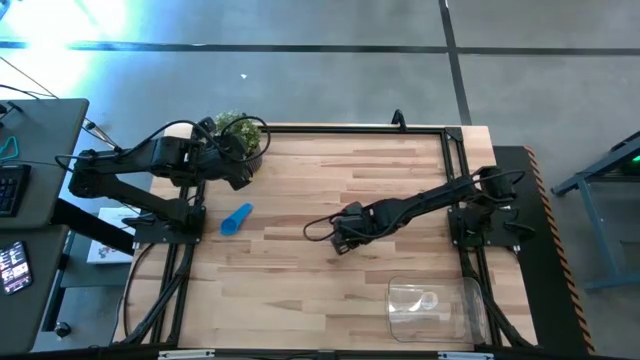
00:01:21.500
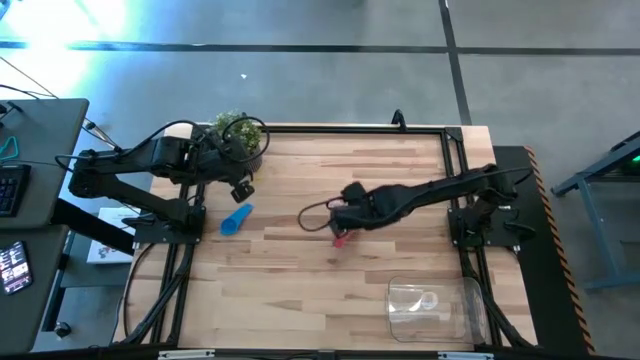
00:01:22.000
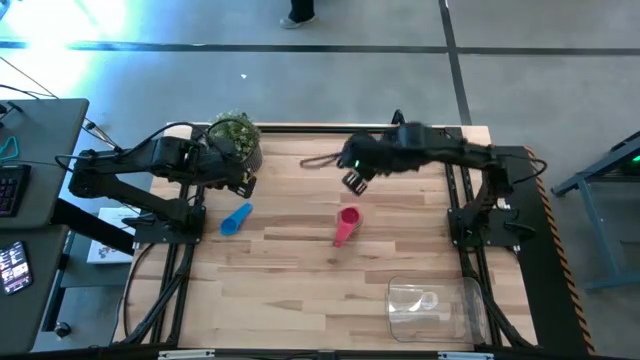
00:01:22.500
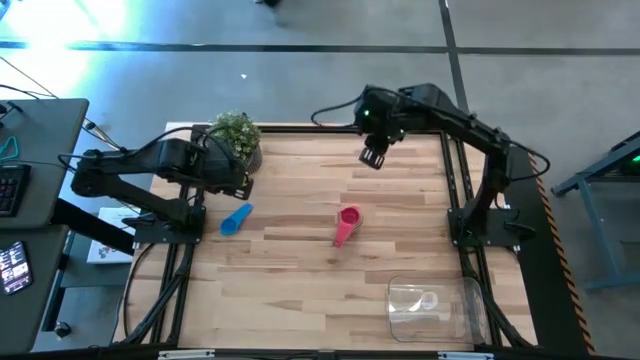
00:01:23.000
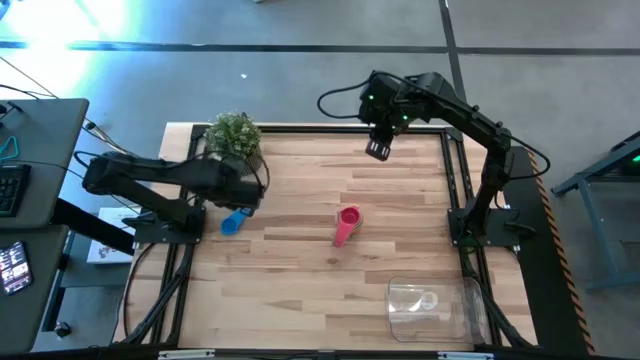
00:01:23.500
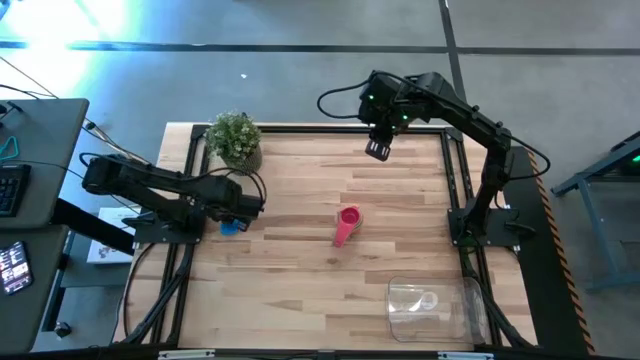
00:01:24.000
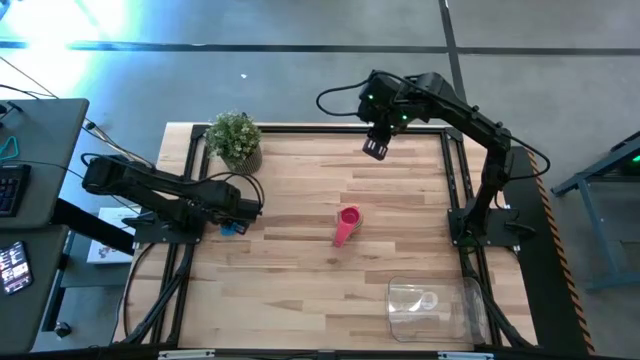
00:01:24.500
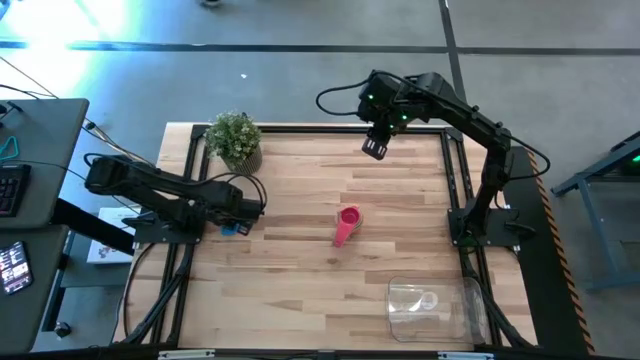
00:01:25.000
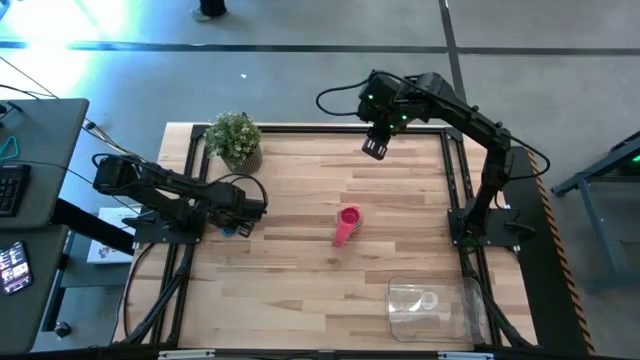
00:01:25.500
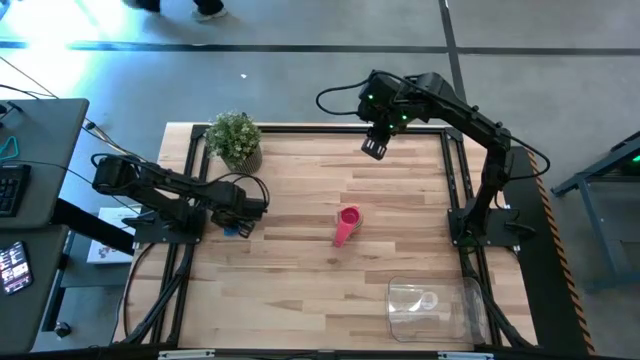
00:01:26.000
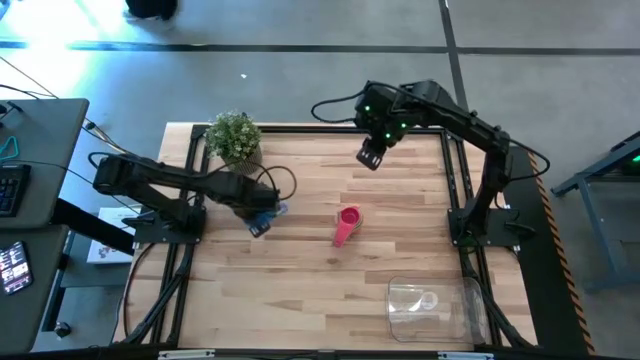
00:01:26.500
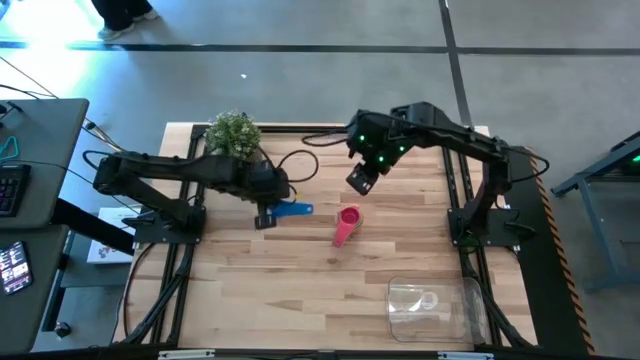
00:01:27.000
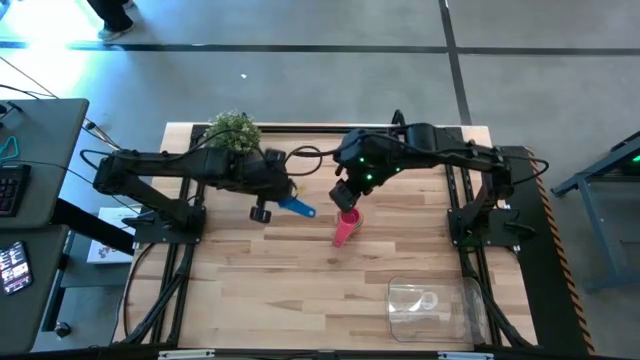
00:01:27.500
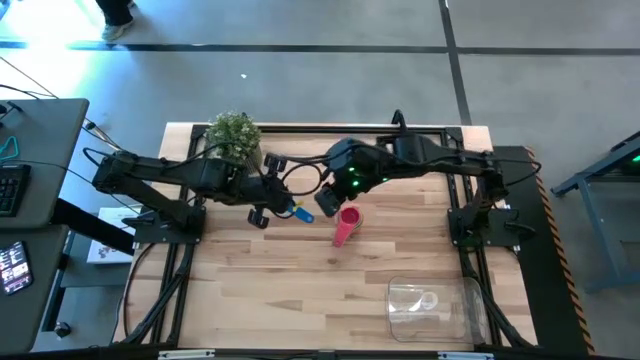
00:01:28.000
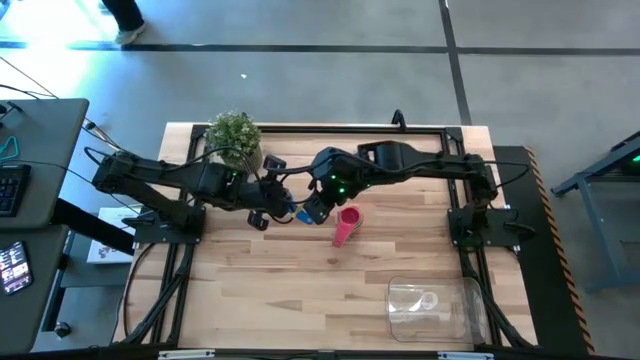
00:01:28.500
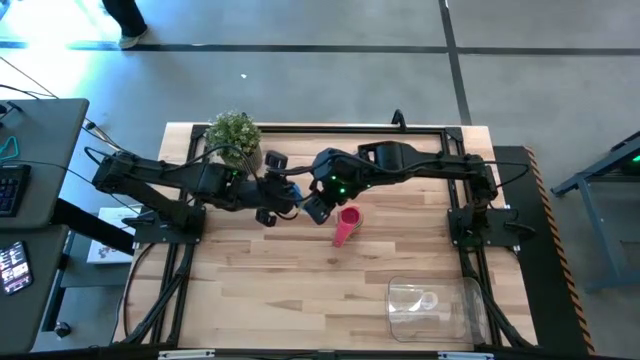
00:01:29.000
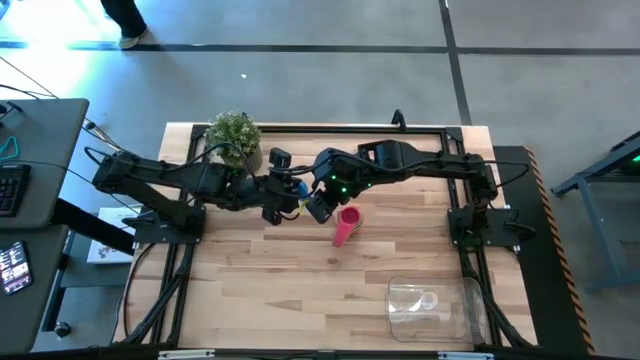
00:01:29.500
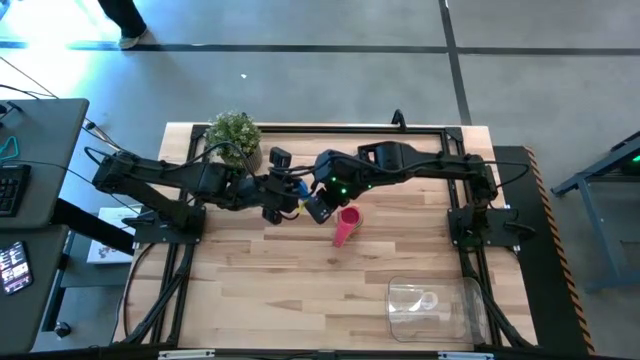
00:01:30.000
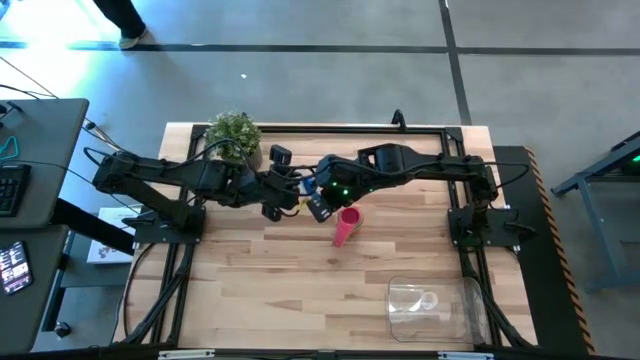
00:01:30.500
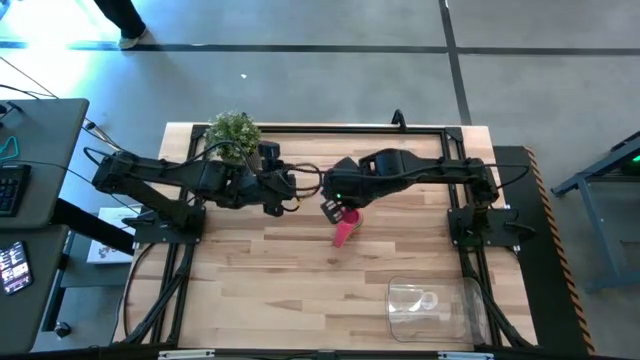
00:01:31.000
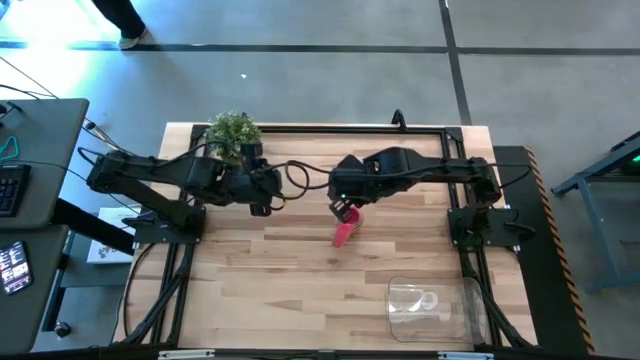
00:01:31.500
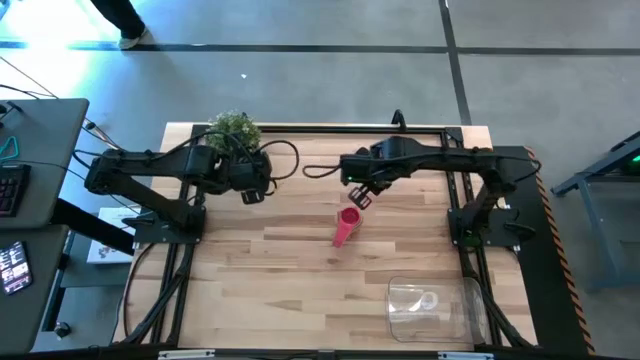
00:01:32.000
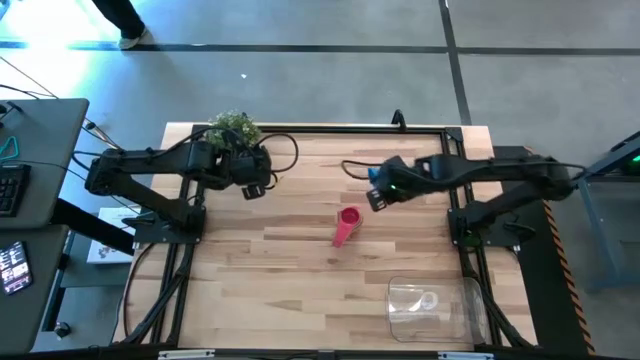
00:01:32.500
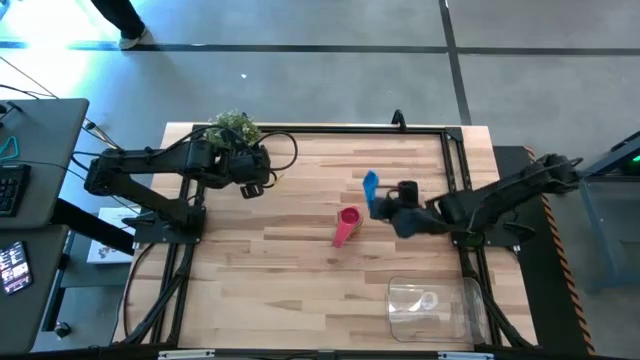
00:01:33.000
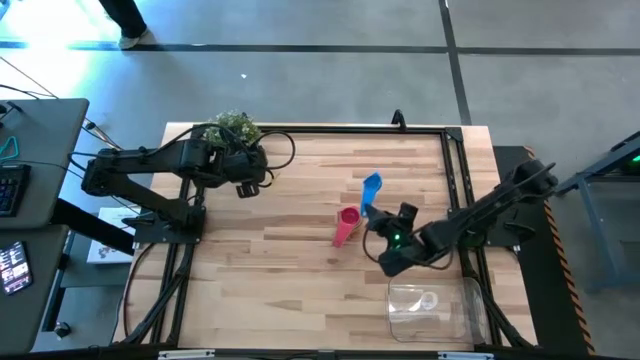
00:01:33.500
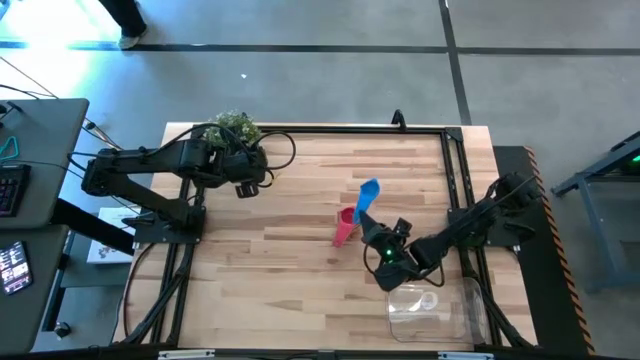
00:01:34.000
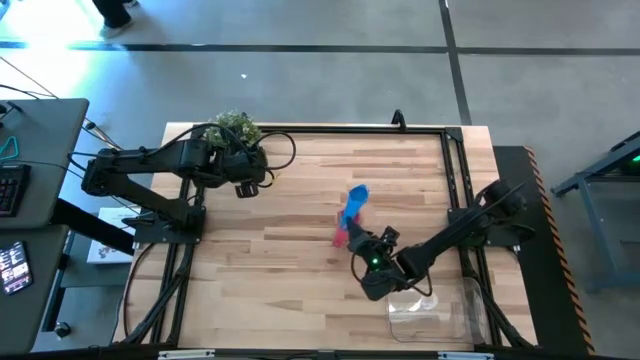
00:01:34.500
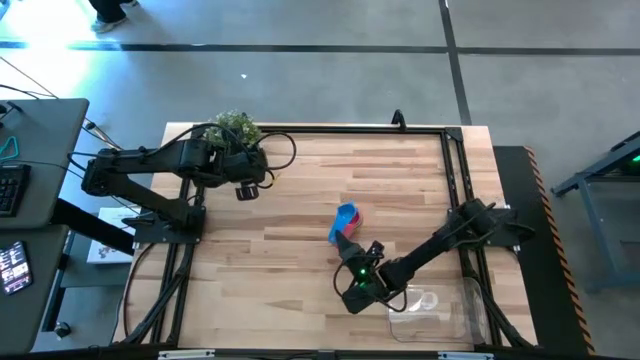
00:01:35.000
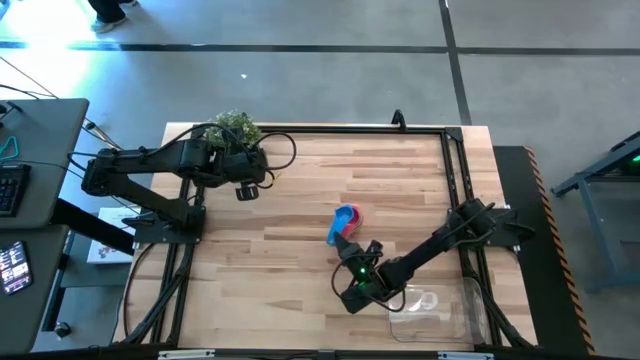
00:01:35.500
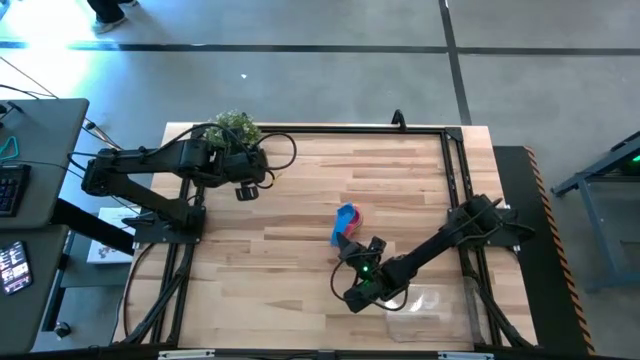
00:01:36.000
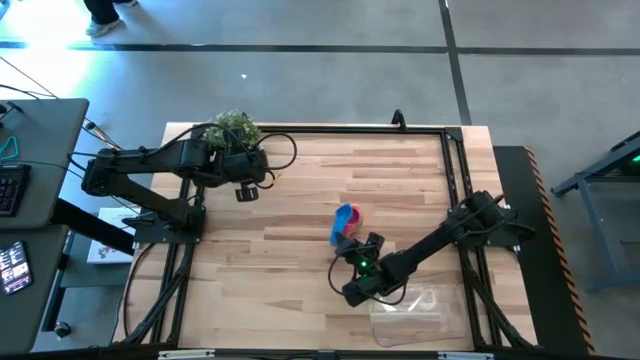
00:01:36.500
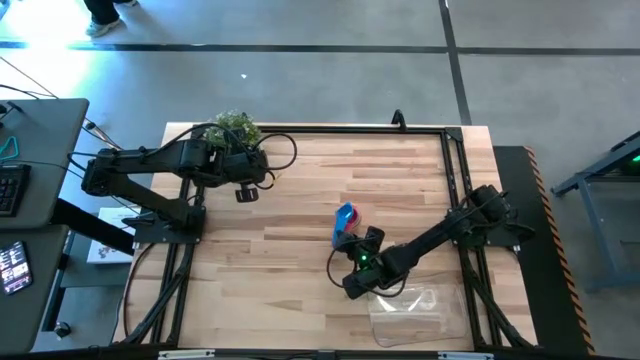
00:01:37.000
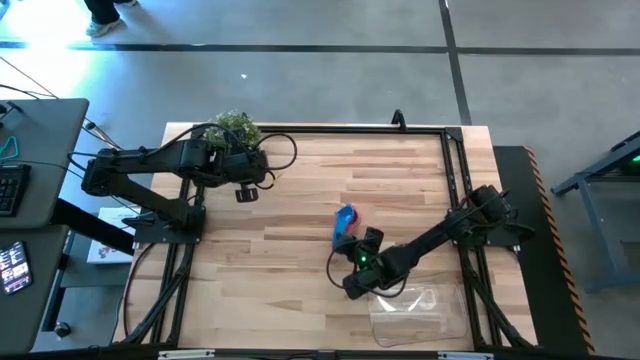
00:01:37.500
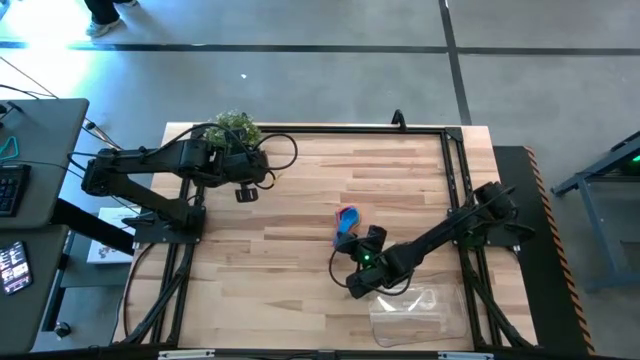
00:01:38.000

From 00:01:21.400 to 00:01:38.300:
Task: Nest measuring cups in basket
Stack the blue measuring cup on the red measuring cup

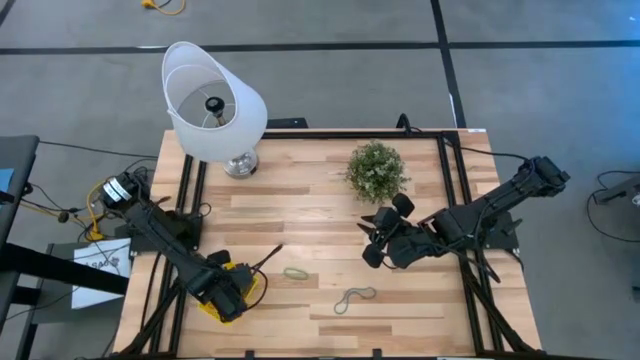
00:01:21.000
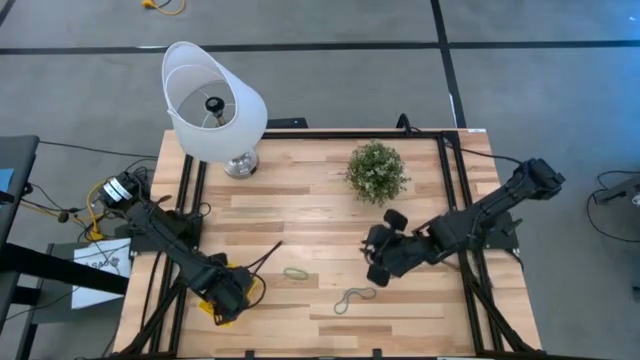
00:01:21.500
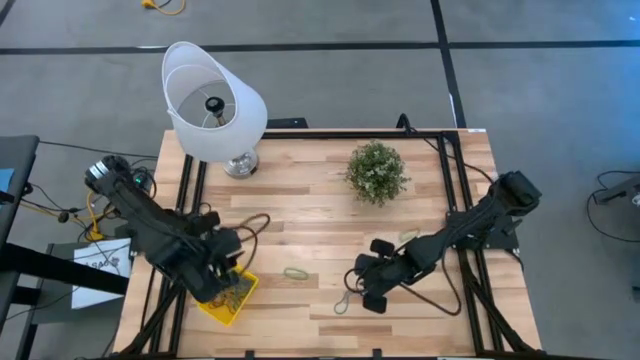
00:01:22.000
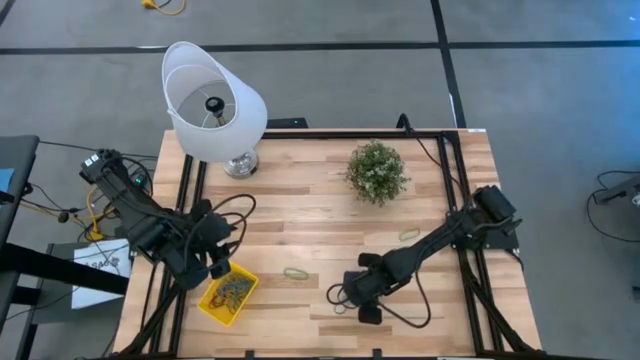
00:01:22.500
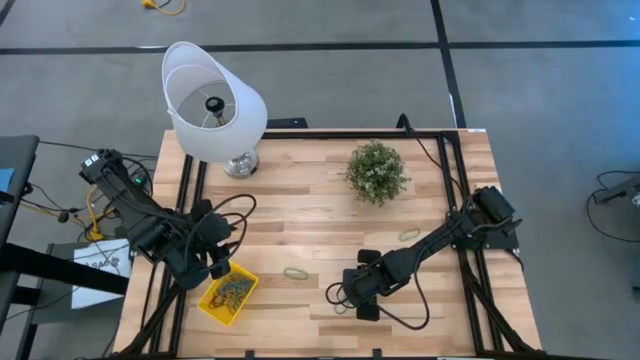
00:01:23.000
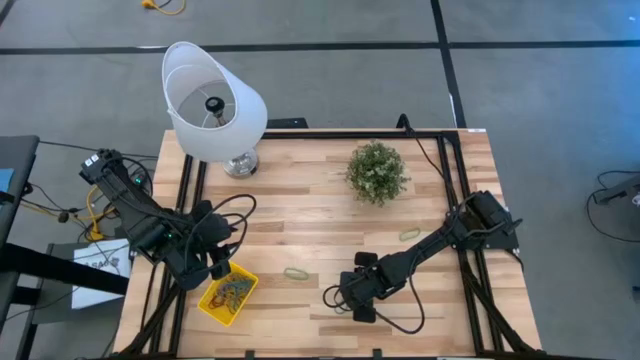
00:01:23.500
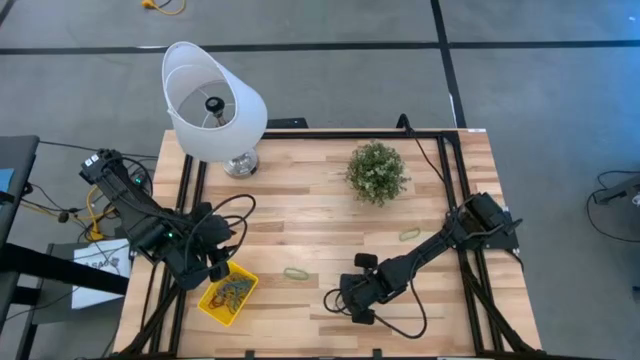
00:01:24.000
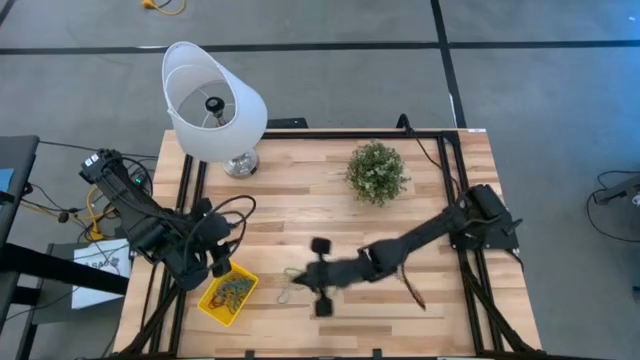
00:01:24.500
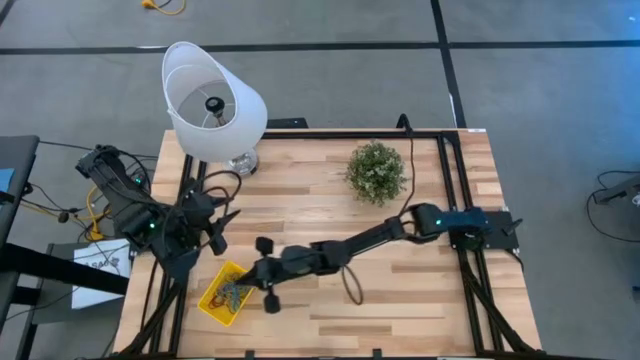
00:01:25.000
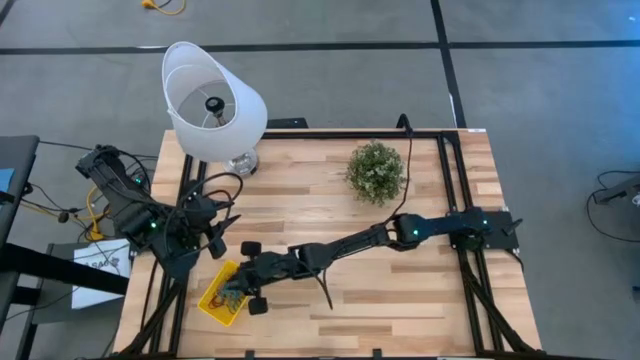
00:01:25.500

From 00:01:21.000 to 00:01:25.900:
Task: Pick and place items into bin
Put the blue rubberband into the yellow bin
